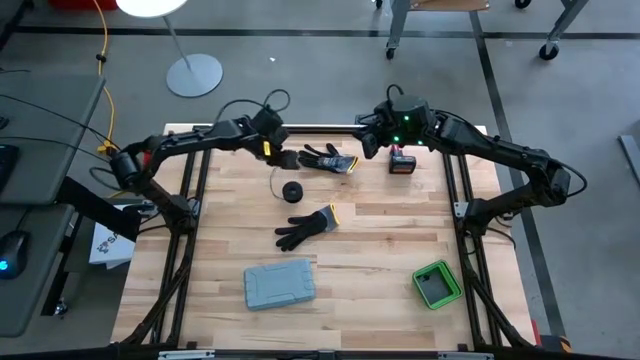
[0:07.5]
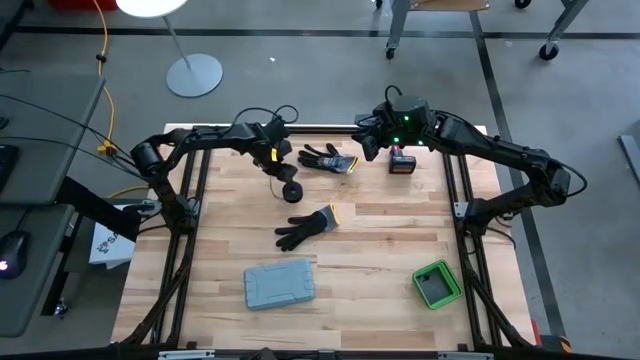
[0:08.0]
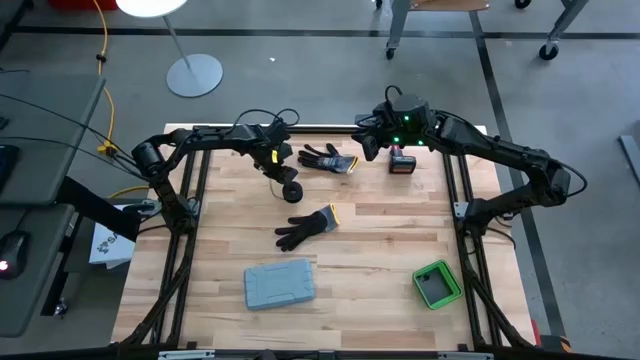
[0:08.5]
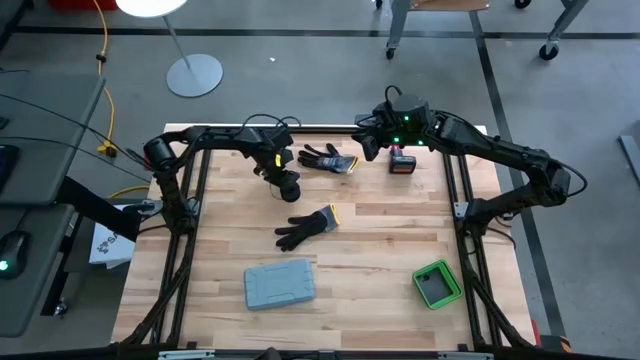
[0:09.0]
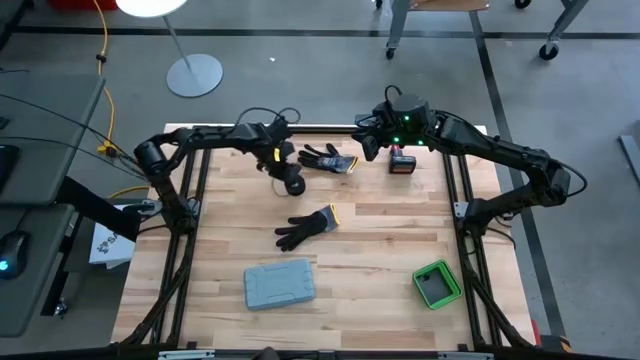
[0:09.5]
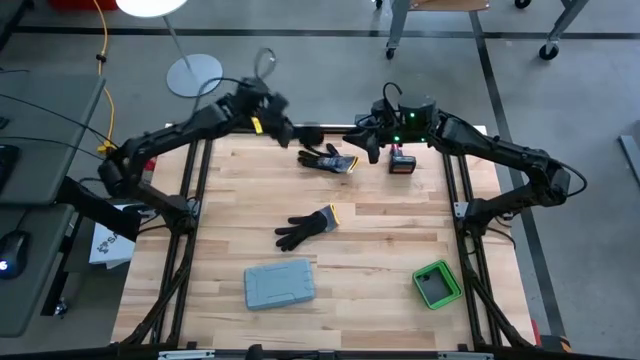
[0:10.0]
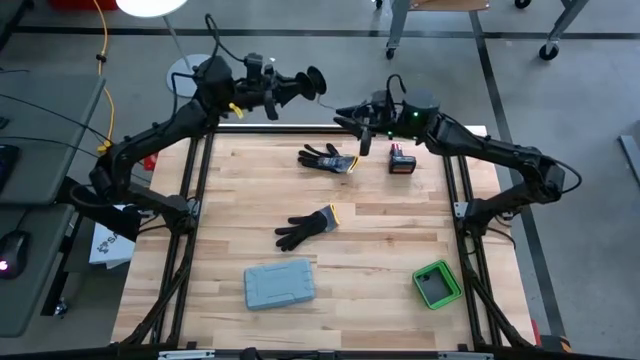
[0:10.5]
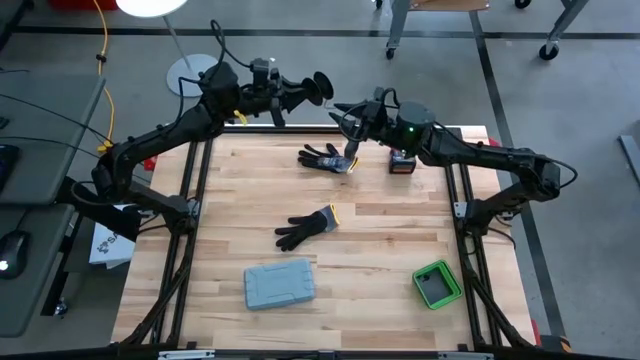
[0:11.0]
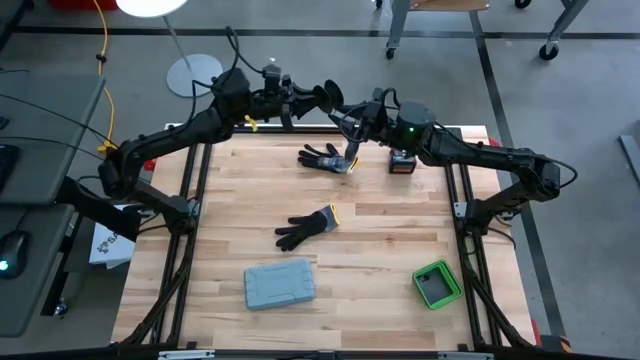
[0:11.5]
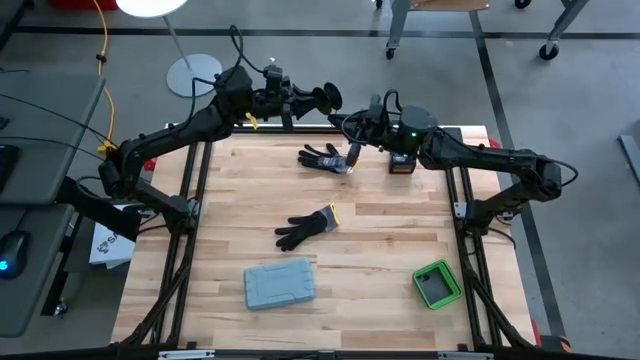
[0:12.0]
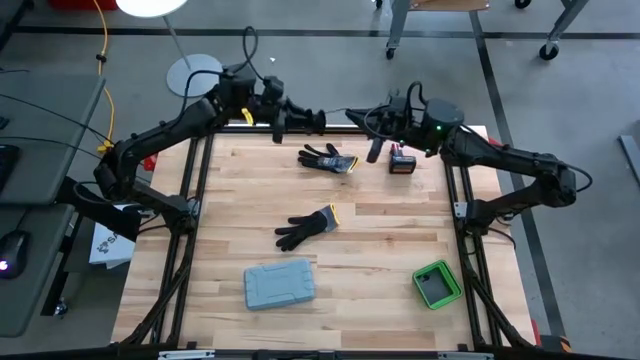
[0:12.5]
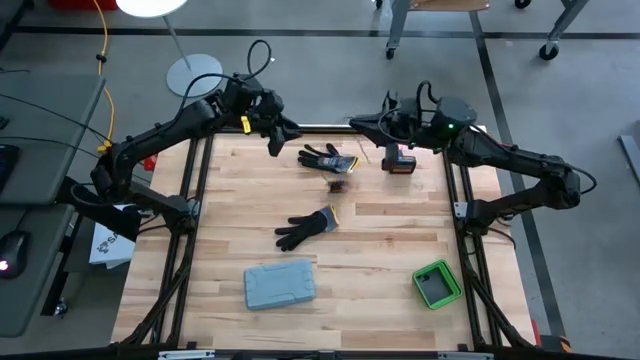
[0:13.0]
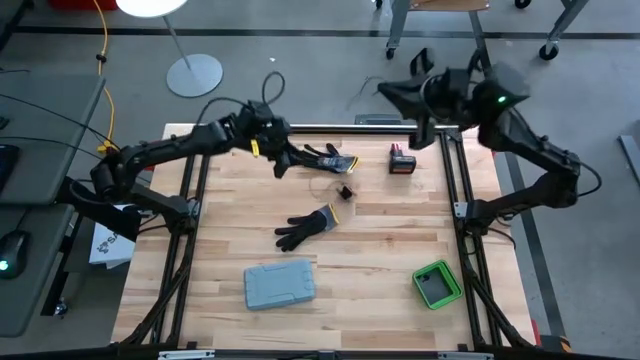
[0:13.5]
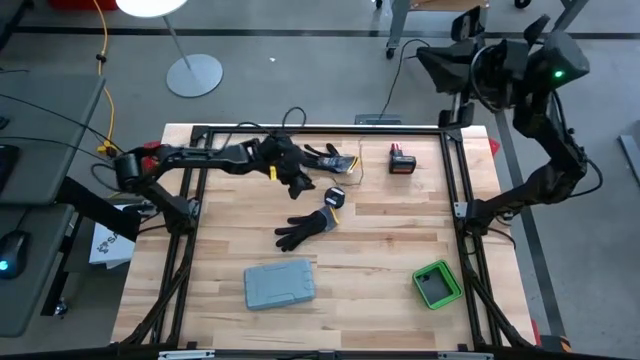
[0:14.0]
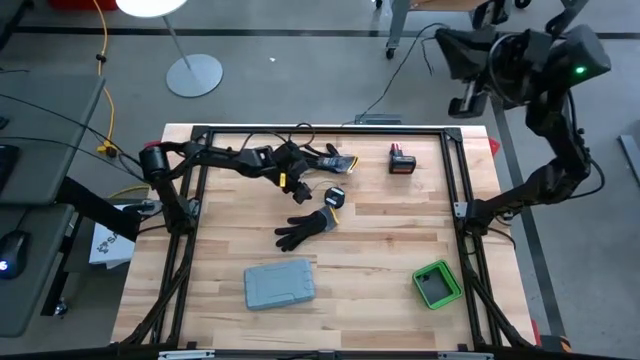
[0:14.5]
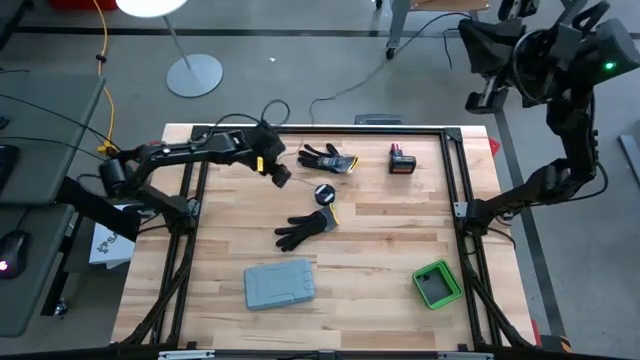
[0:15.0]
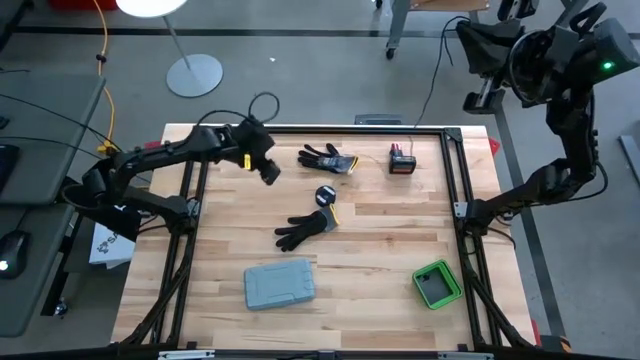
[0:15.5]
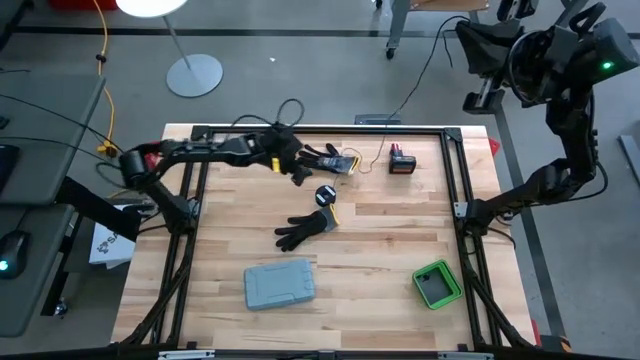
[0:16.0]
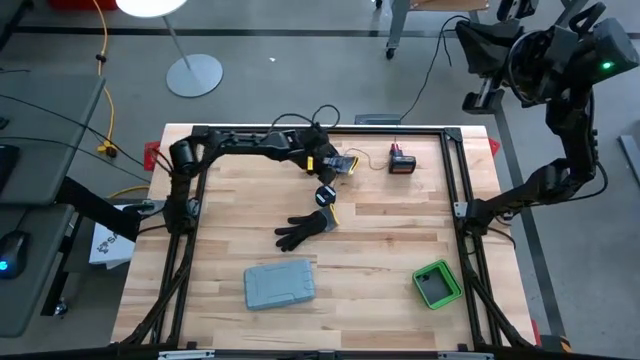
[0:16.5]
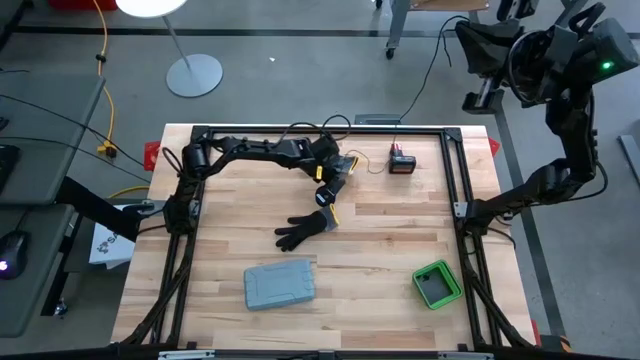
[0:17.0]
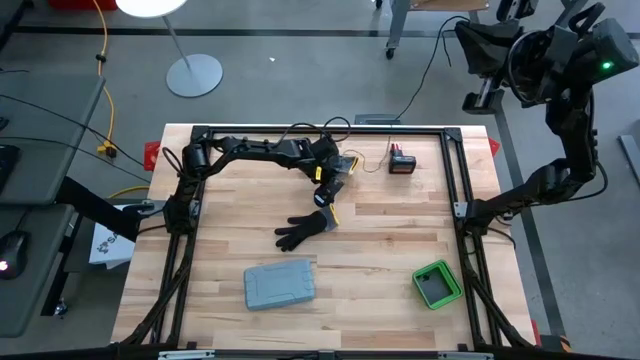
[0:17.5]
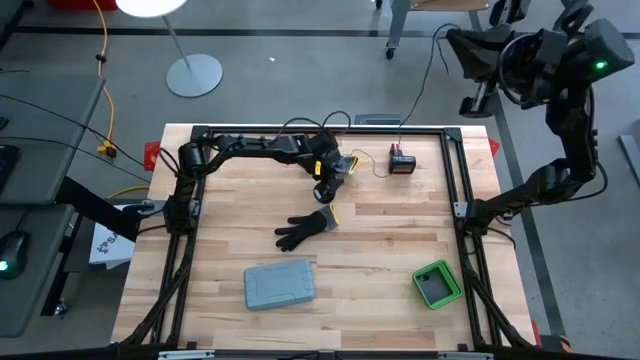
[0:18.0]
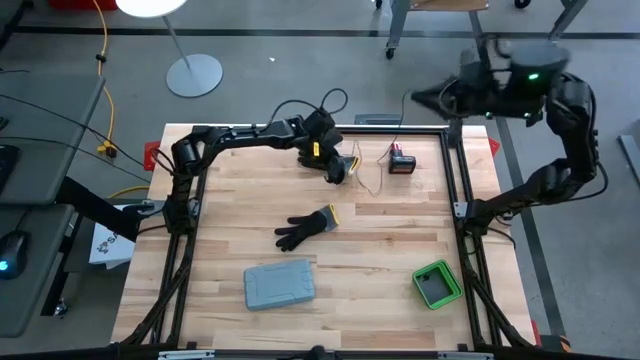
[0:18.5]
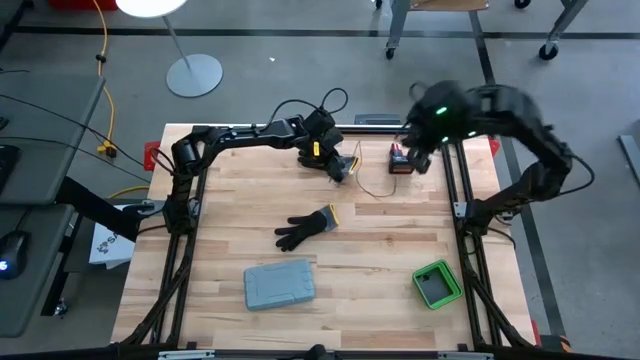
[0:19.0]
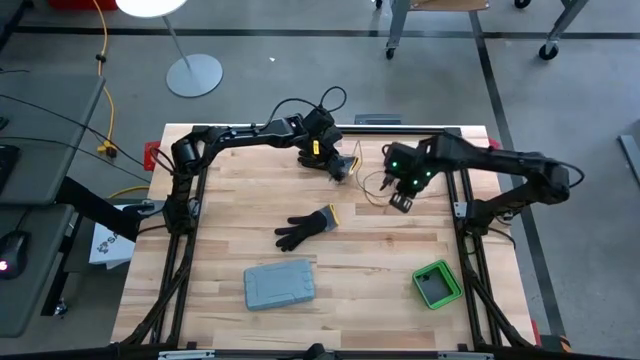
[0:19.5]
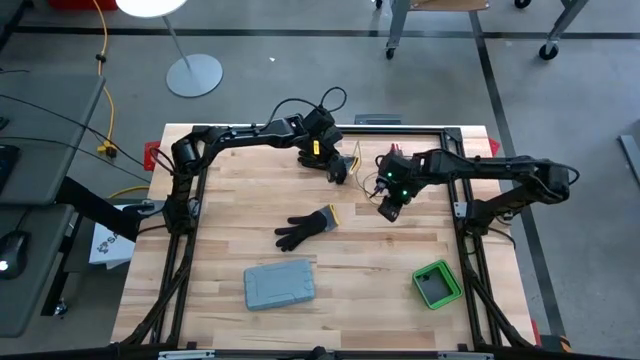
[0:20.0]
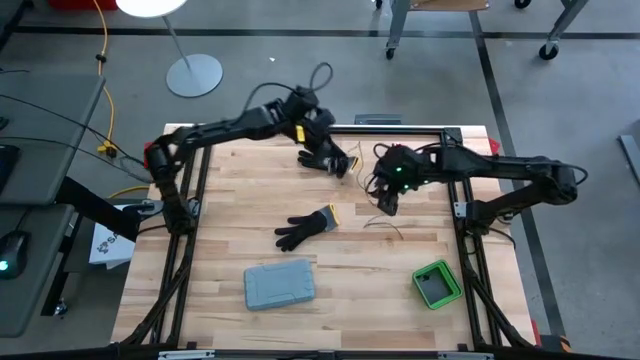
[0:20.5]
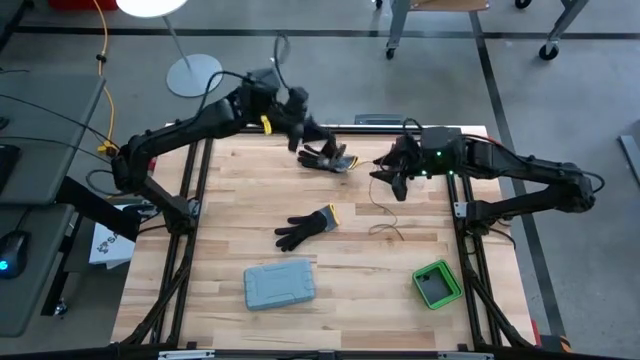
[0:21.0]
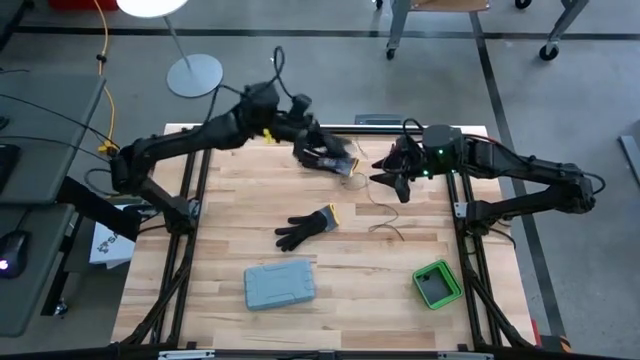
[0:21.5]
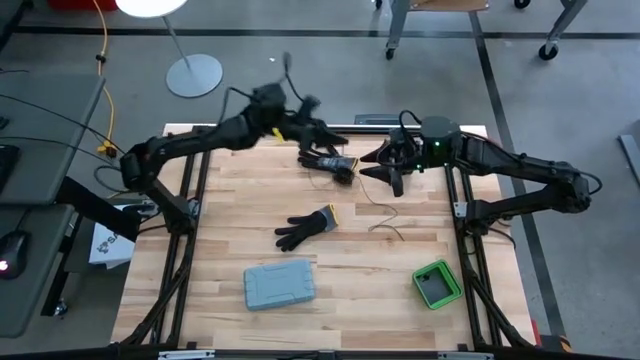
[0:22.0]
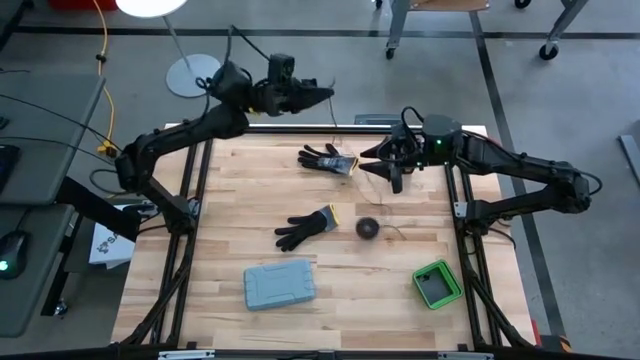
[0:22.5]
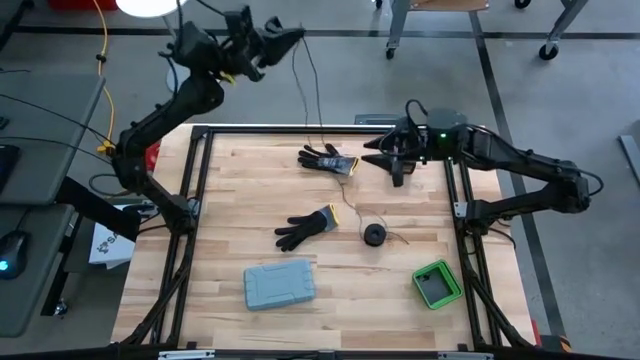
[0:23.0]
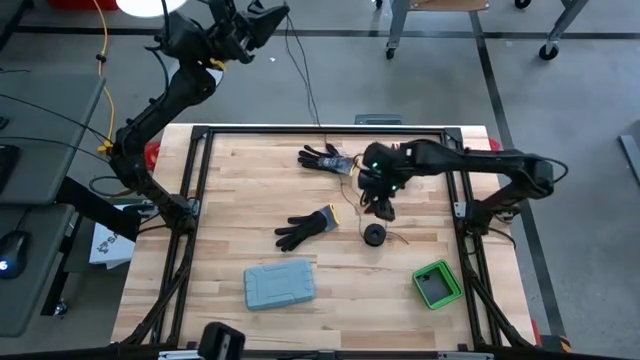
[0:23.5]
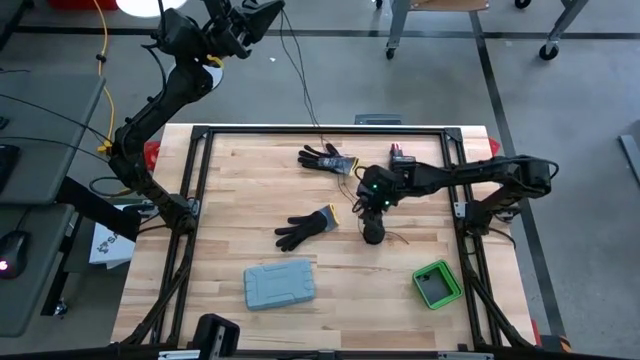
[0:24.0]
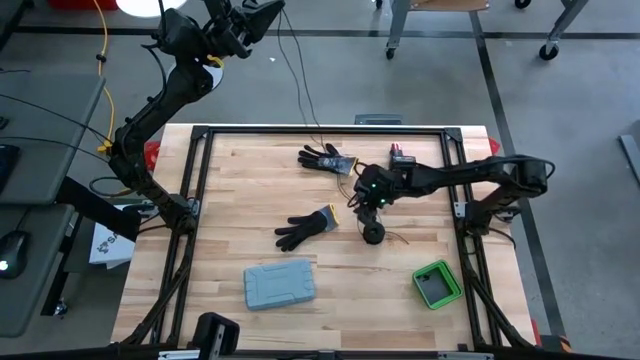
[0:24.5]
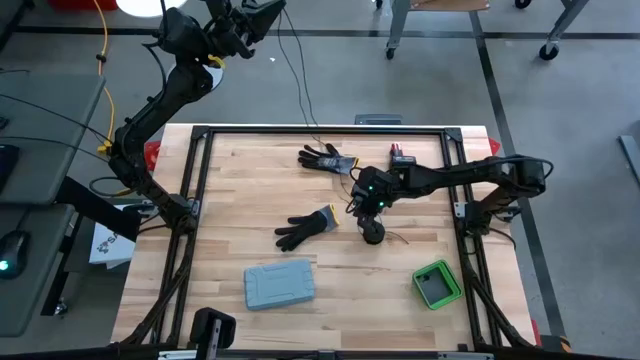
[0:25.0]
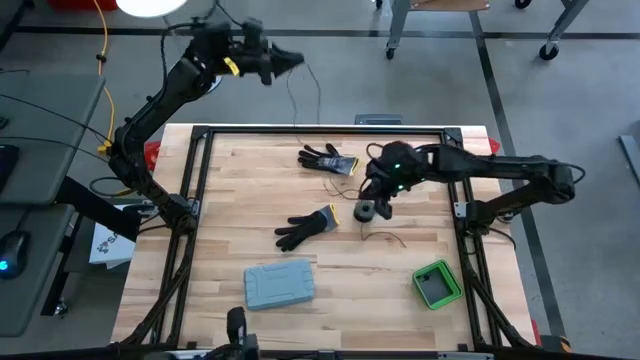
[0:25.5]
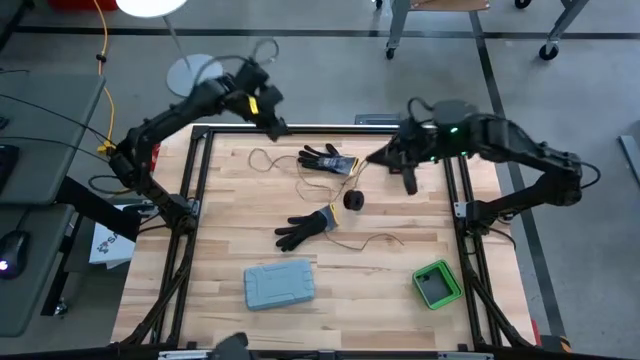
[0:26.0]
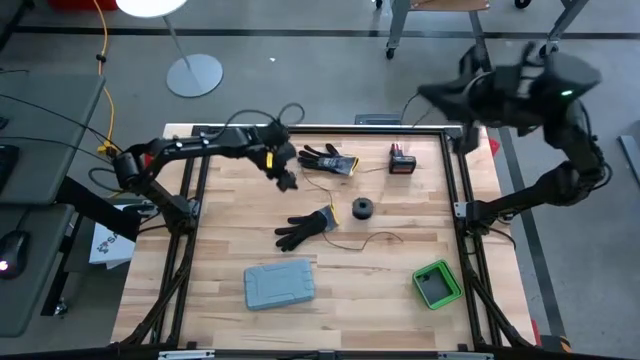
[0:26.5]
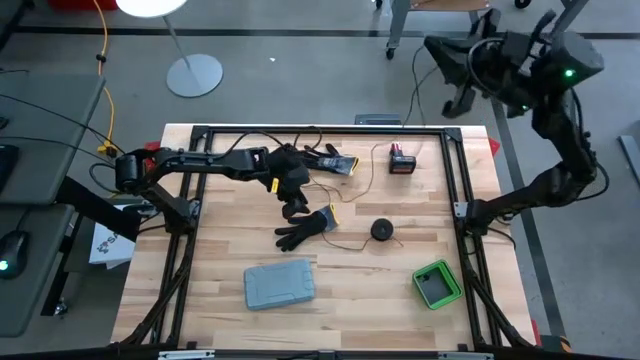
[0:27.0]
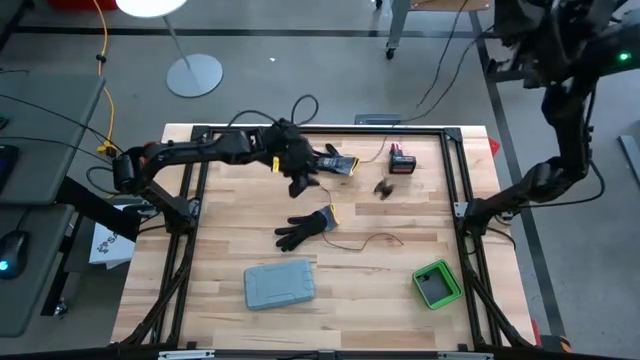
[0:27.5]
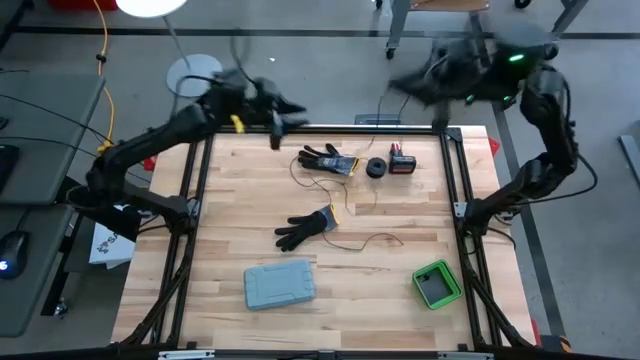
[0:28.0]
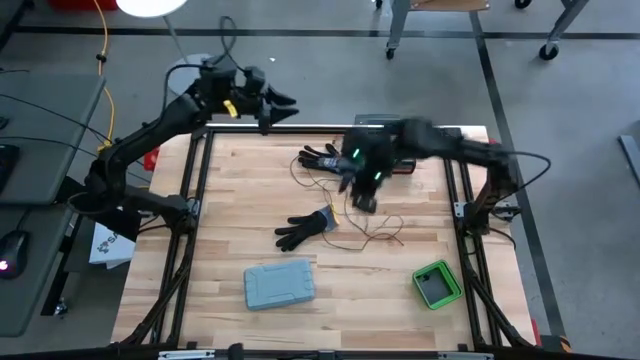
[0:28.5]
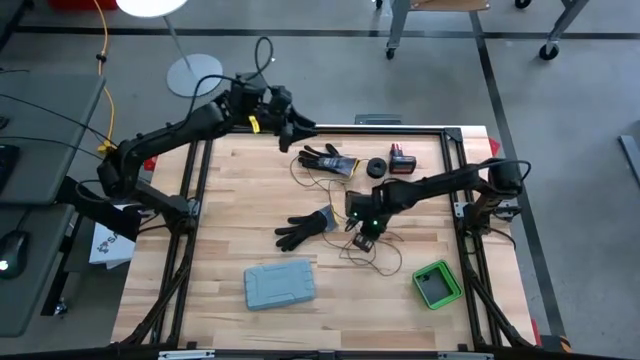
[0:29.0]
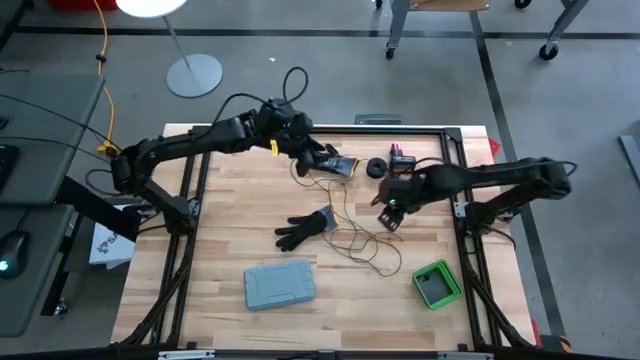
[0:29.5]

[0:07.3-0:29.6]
Task: Coil cords
Uncoil the black wire cable from the black spool
